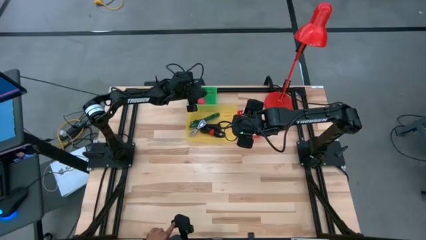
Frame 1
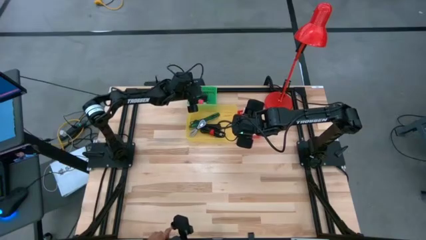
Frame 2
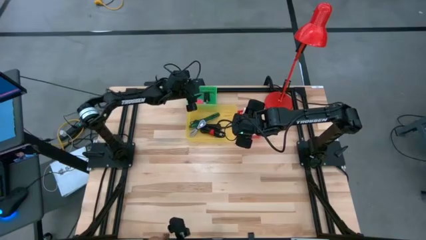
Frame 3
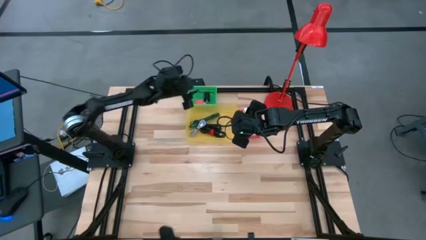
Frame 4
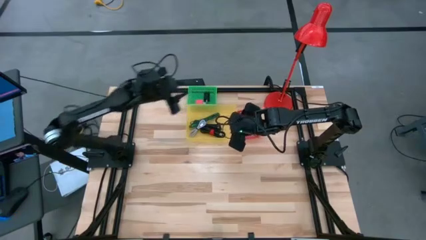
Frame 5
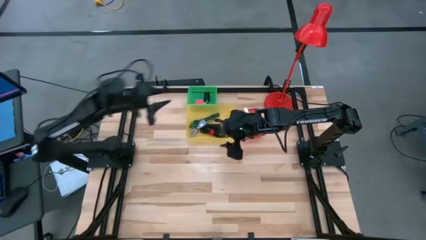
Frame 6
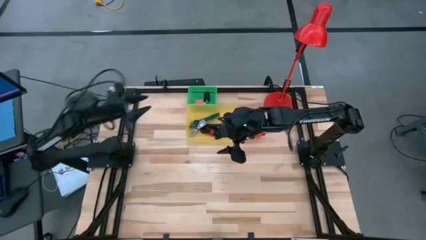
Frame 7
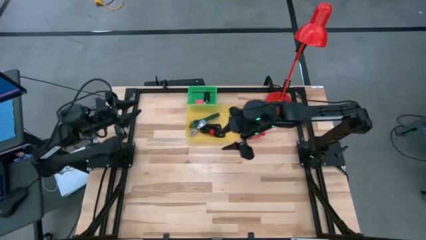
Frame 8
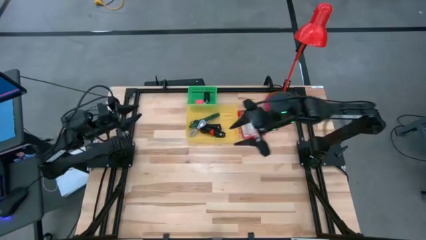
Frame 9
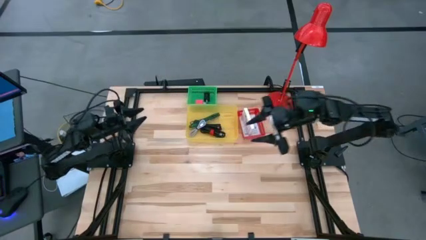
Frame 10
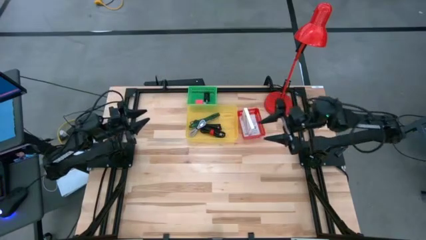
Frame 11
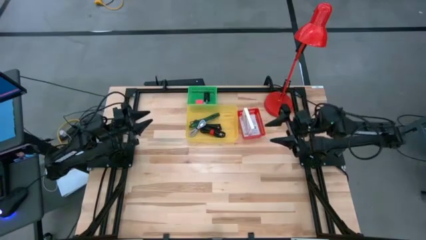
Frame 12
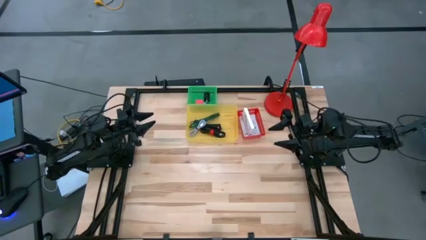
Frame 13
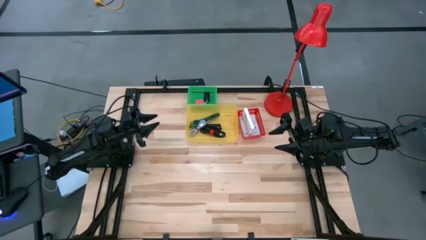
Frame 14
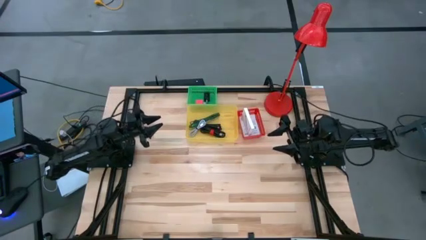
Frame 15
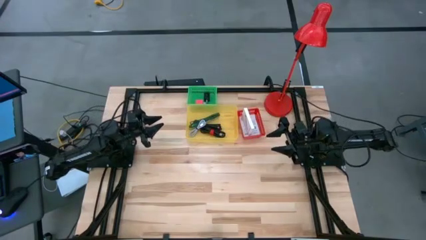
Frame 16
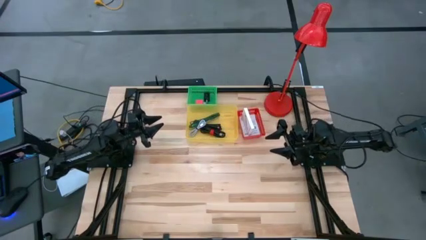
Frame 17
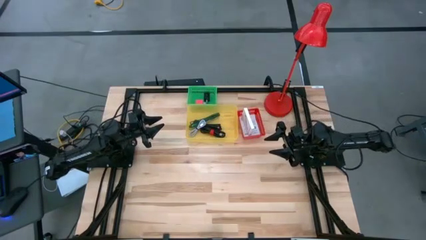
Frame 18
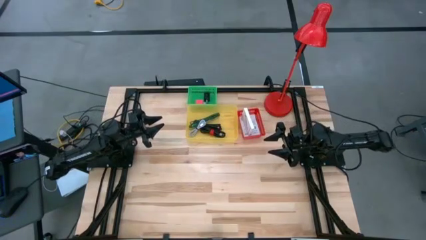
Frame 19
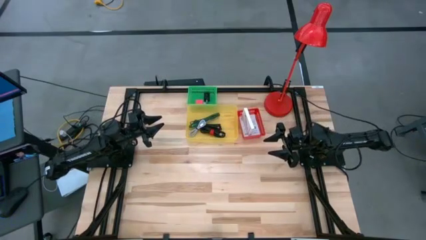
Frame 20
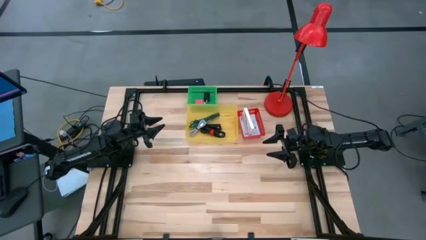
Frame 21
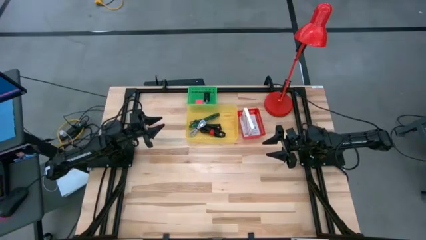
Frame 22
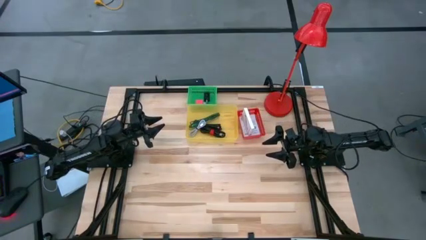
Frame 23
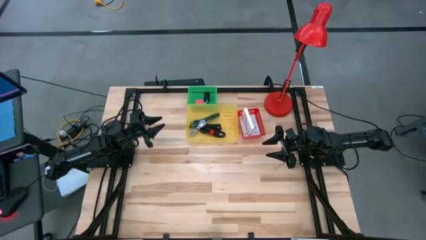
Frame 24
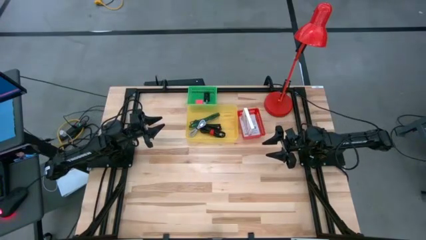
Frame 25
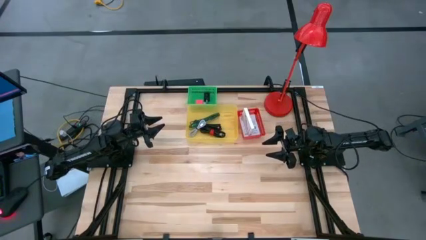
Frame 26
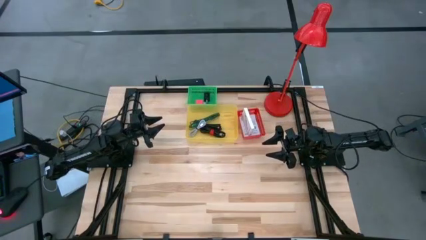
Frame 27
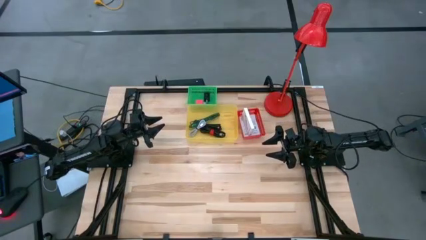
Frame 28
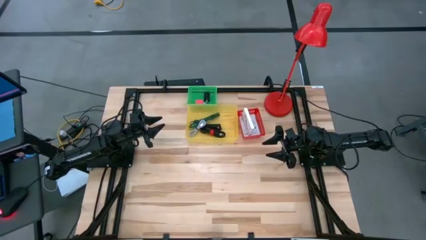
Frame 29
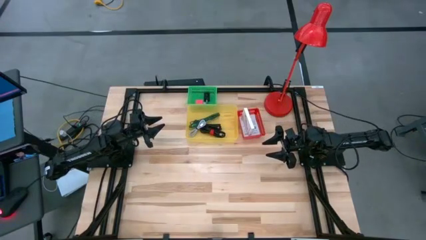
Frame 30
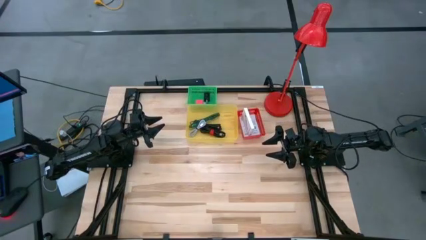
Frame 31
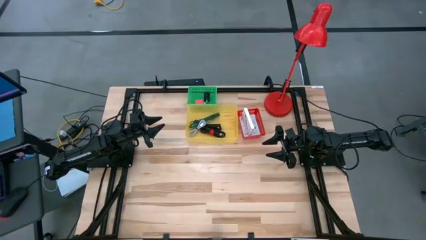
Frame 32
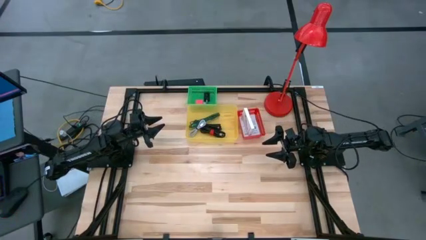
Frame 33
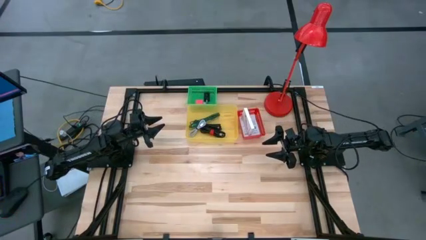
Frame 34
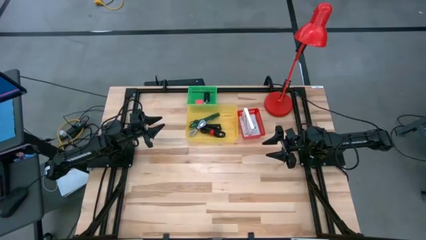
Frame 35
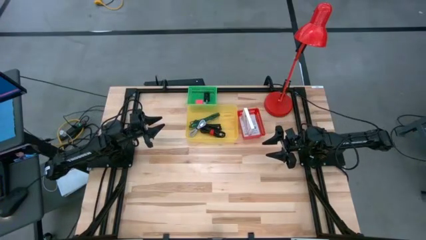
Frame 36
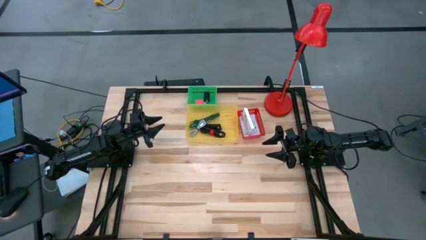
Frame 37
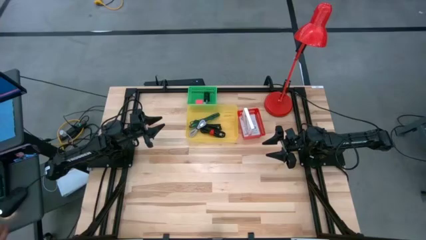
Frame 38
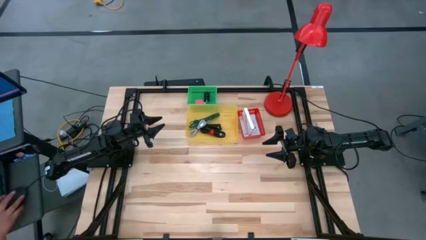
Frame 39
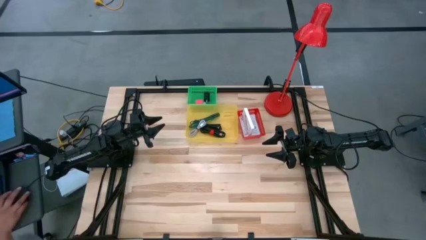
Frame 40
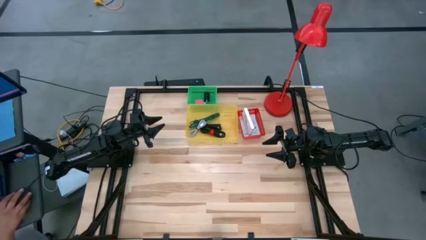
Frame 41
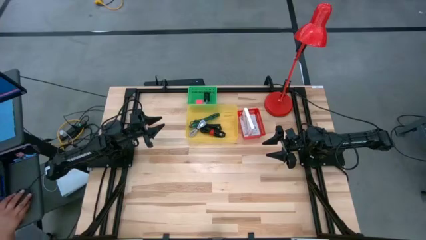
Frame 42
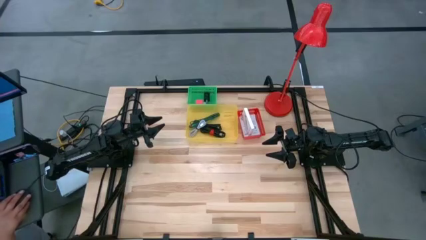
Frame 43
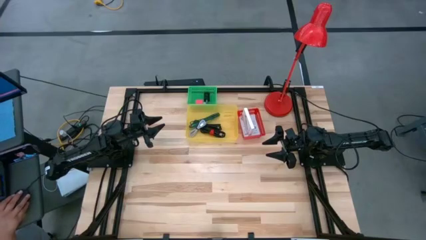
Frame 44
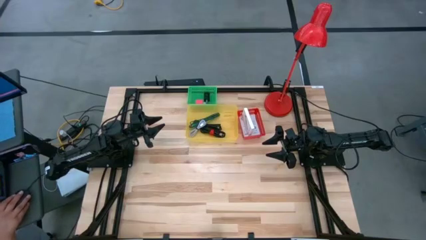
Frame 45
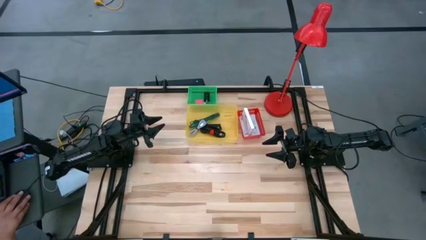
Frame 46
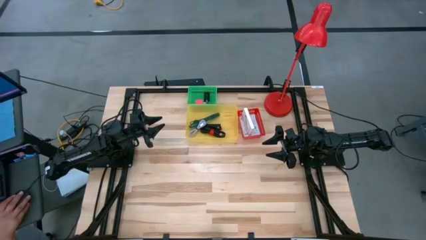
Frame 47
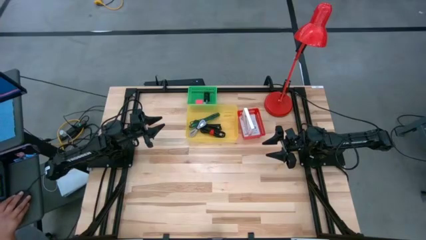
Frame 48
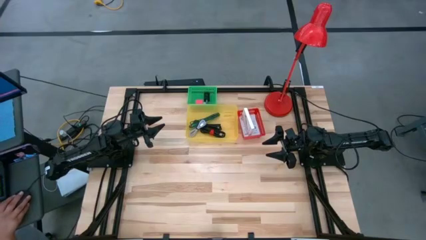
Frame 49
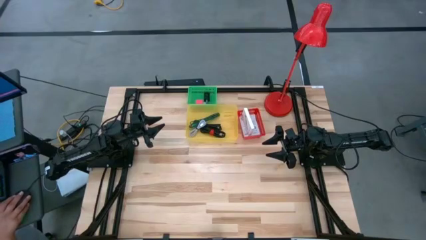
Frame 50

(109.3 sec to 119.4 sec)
Task: Pick and place items into bin
Return to Home Position

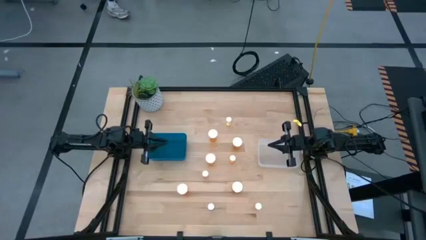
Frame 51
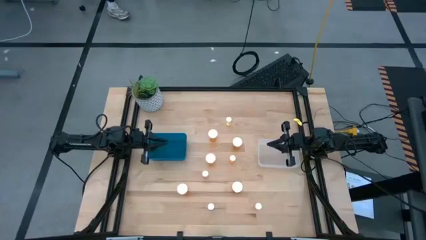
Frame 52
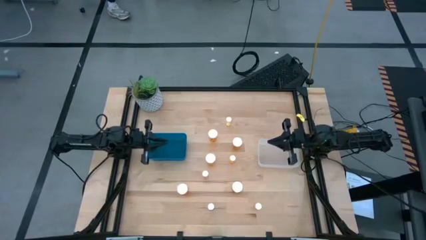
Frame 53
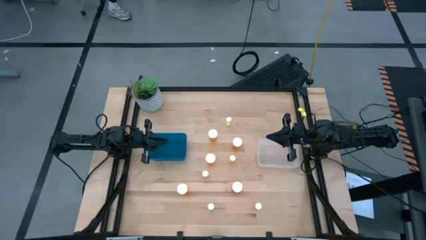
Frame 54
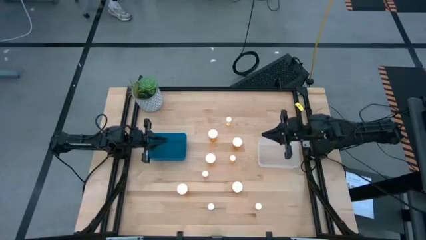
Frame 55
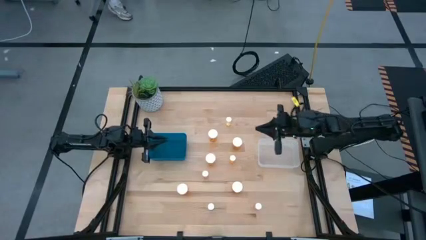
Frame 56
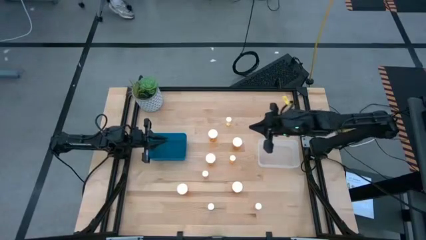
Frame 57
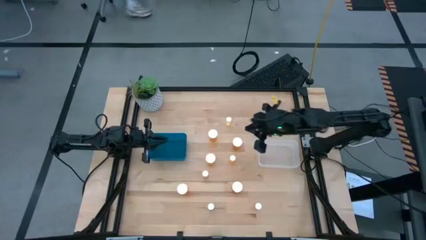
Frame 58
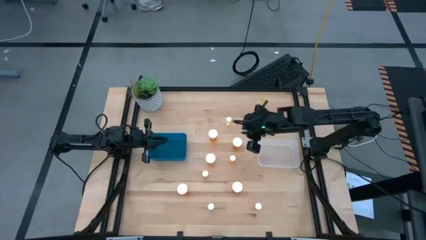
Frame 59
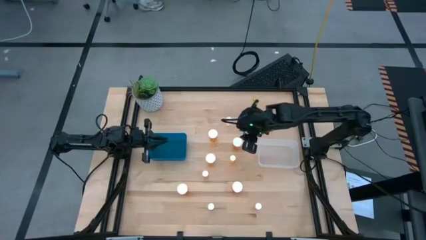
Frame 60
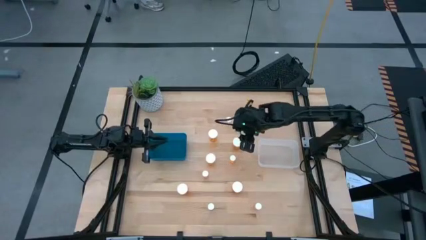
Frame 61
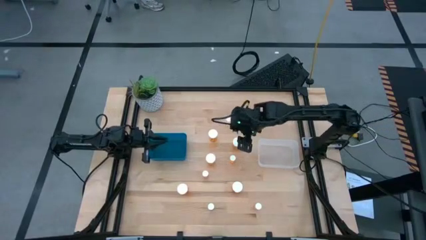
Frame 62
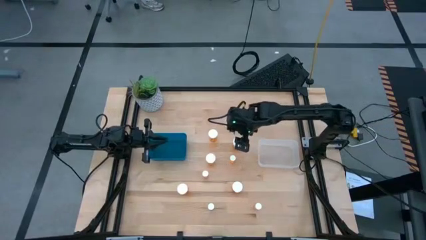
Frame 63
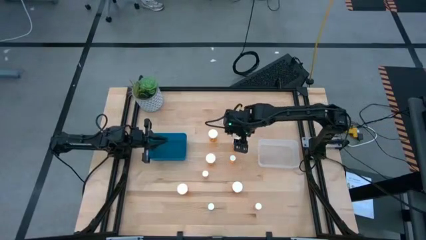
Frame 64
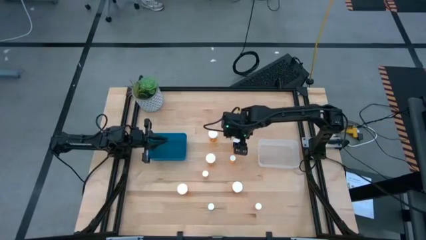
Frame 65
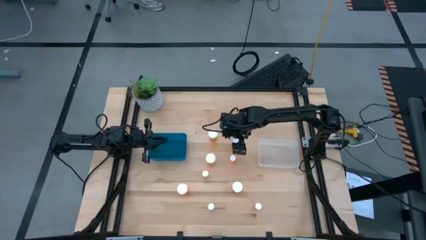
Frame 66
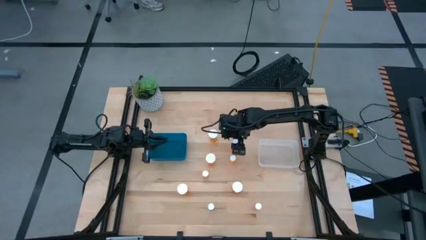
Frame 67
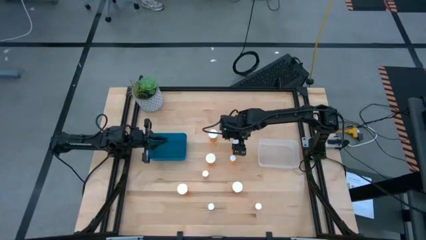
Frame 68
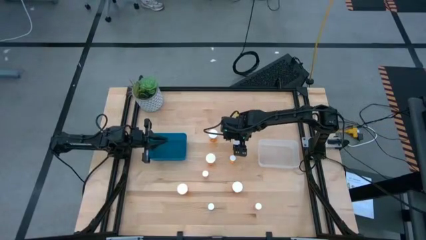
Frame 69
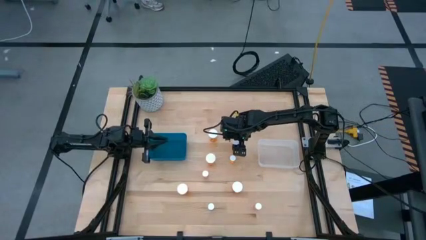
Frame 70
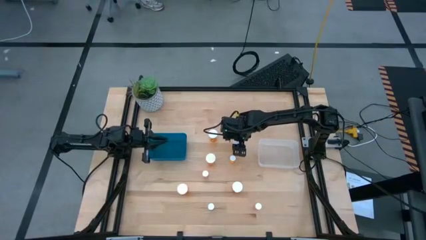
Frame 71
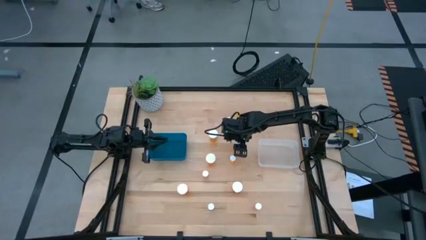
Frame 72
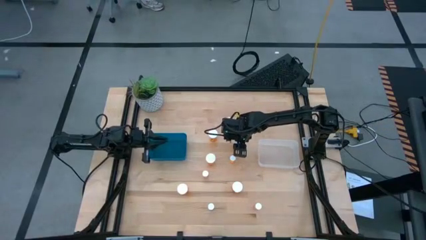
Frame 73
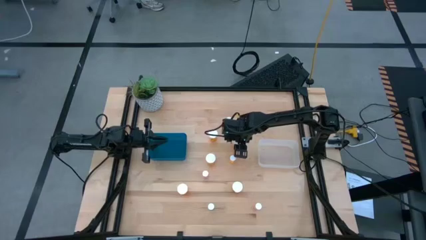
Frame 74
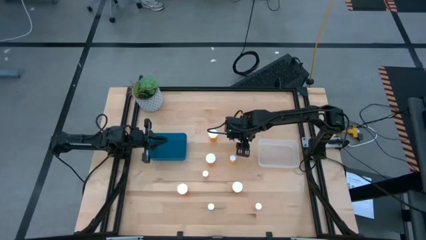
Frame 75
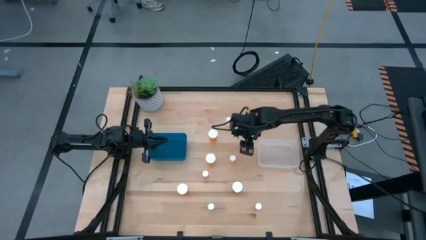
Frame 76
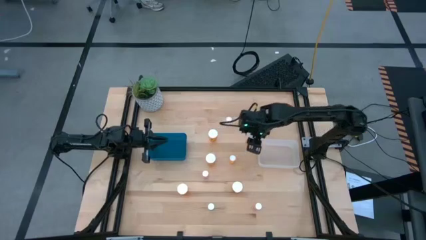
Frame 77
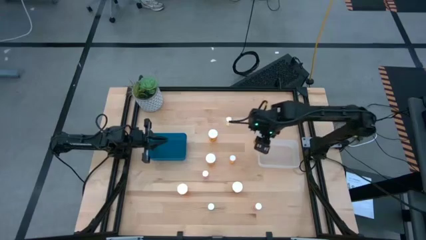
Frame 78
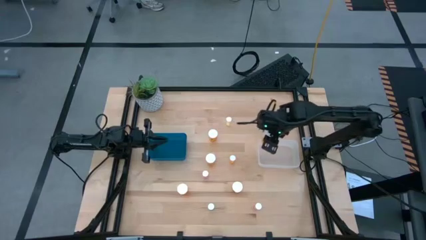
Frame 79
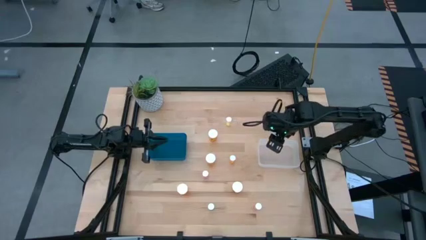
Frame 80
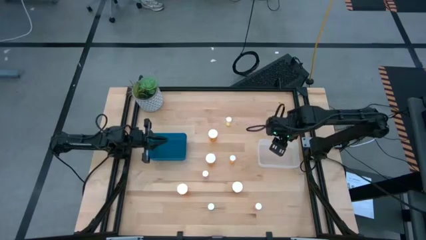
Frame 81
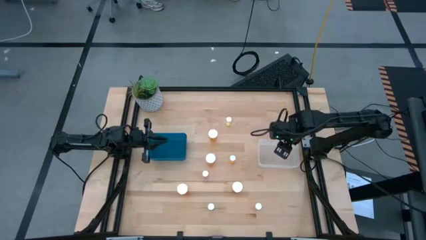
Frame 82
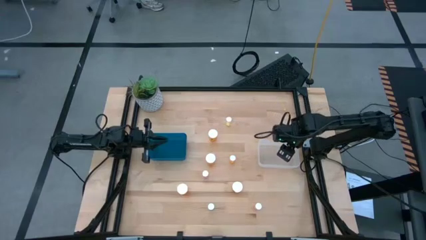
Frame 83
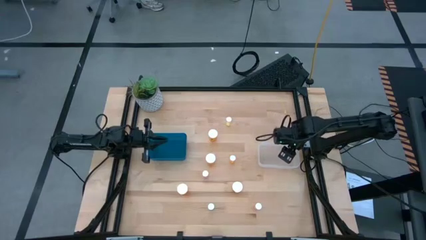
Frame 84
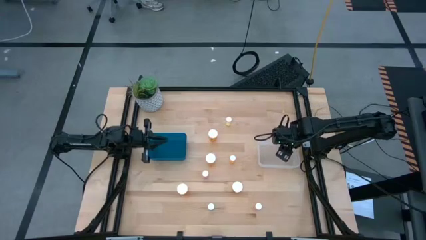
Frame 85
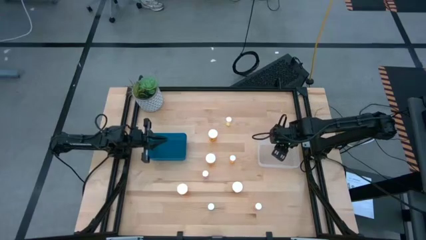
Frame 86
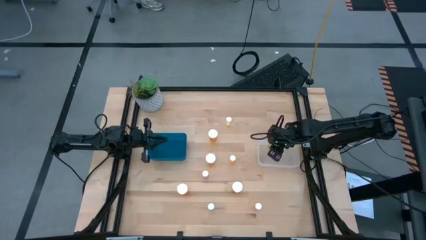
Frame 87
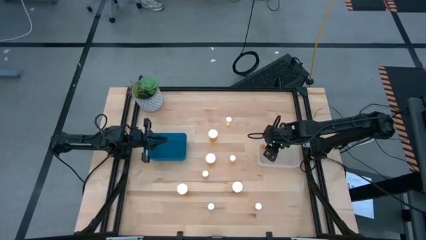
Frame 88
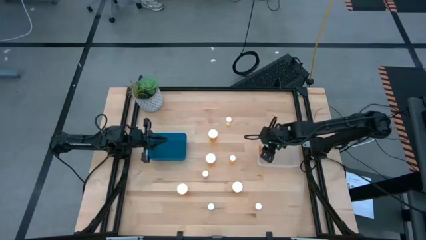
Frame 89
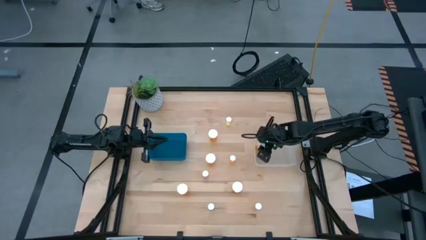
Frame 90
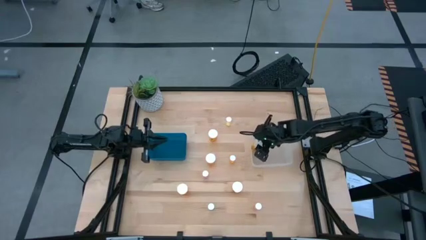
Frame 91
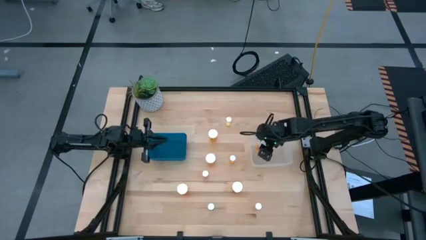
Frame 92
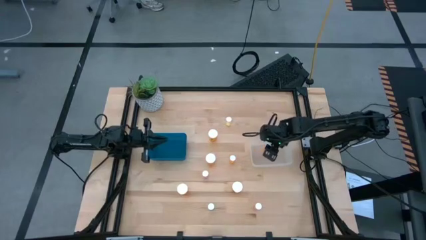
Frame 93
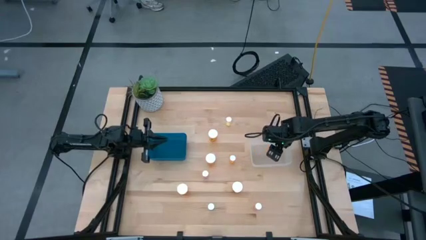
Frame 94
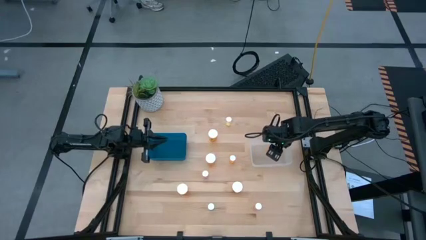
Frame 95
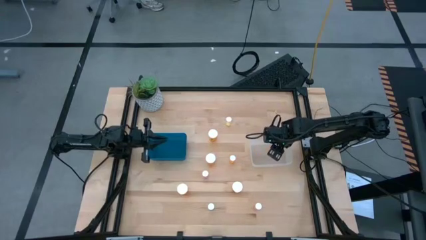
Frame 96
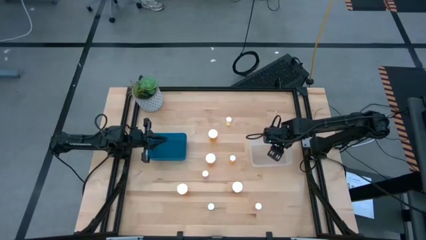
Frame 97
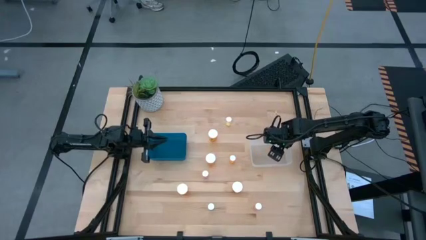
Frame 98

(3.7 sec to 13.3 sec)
Task: Pick and place medicine bottles into bin by pill shape (circle, oval)
Put the large orange pill bottle into the transparent bin
